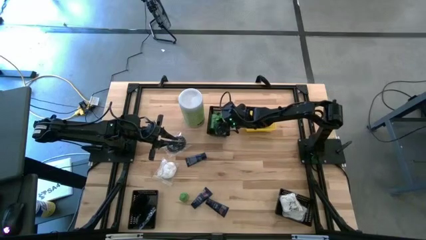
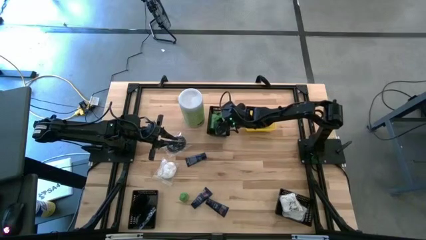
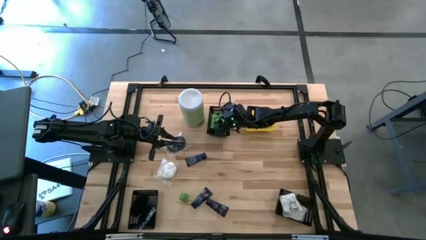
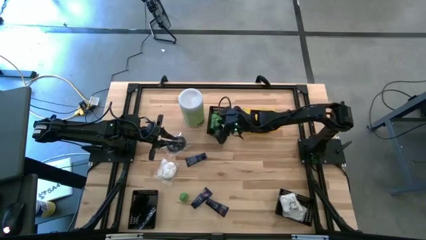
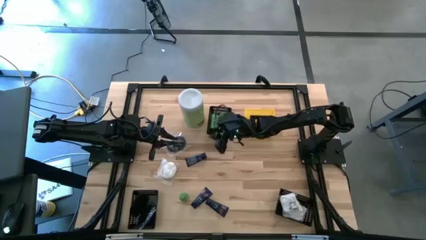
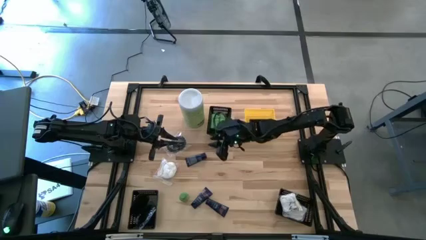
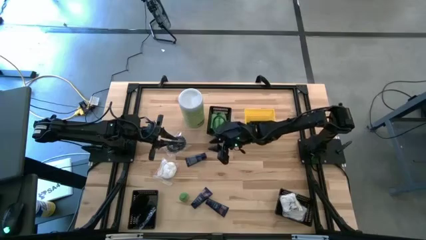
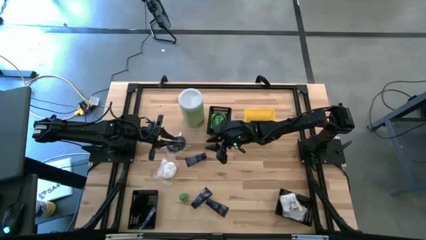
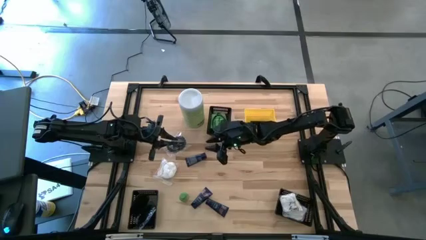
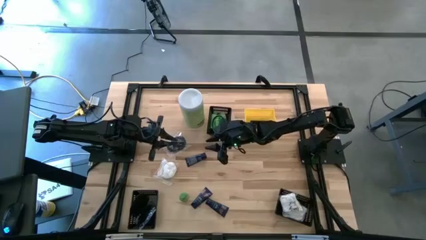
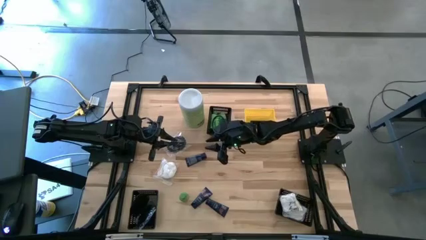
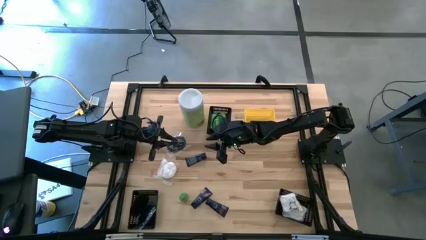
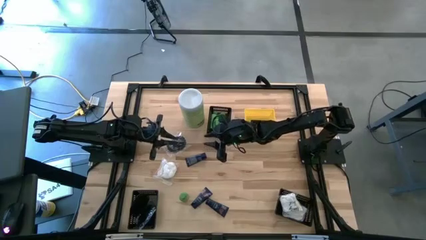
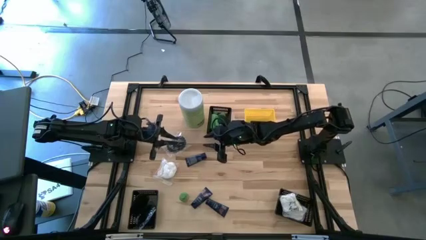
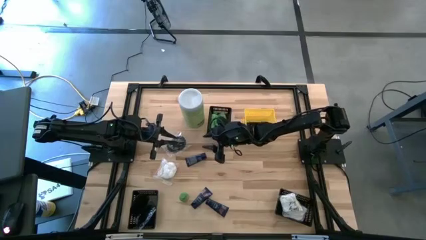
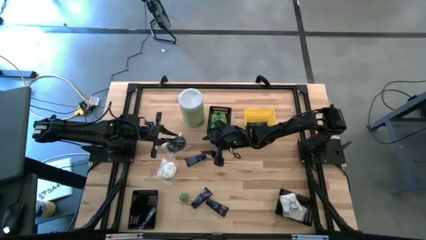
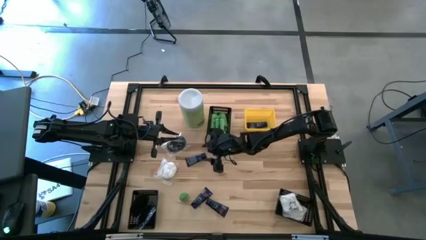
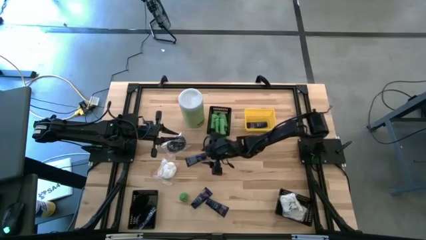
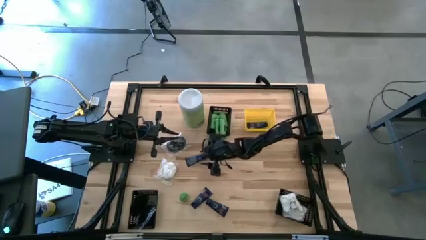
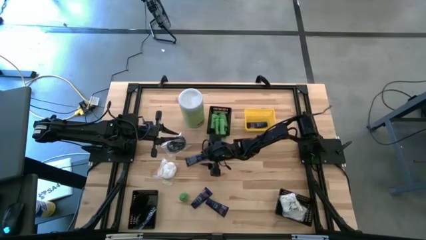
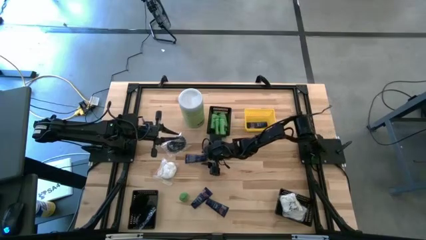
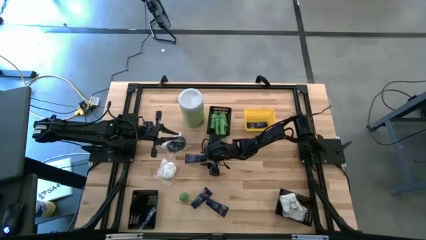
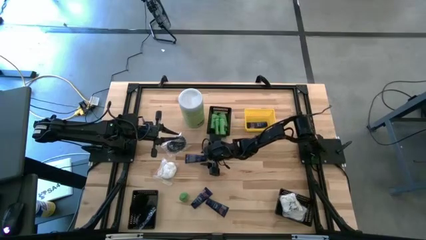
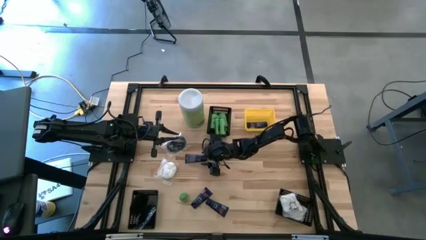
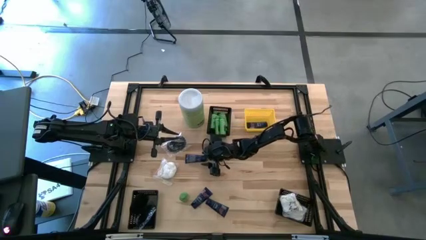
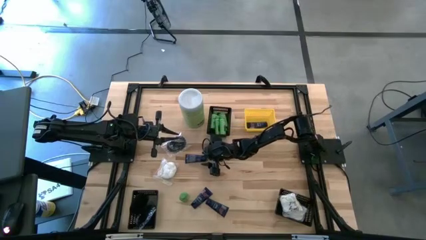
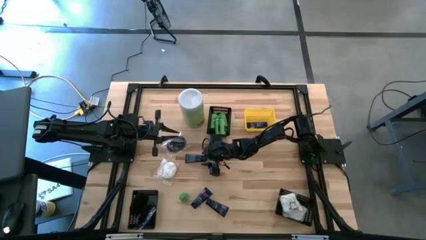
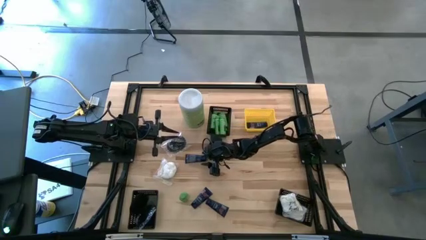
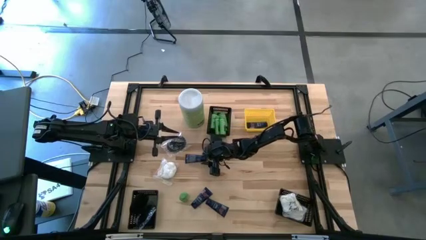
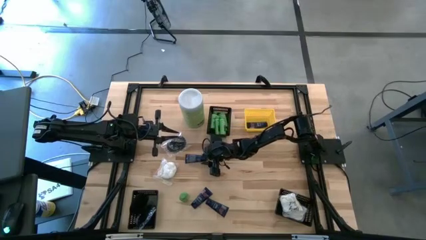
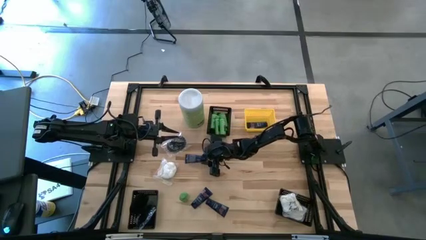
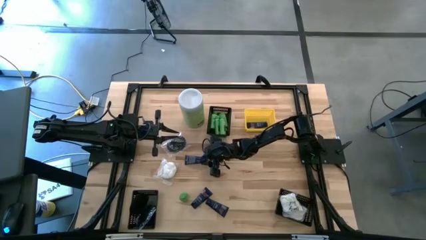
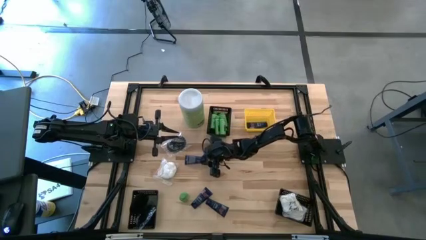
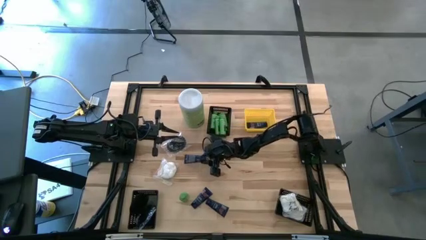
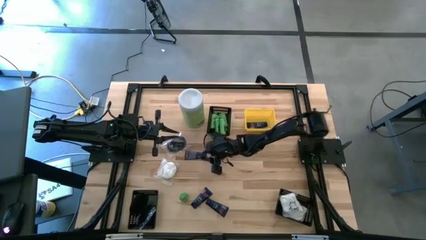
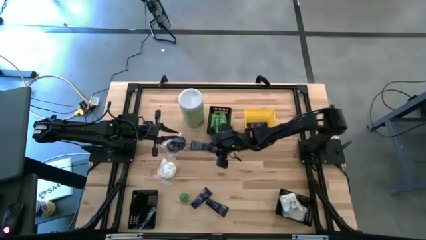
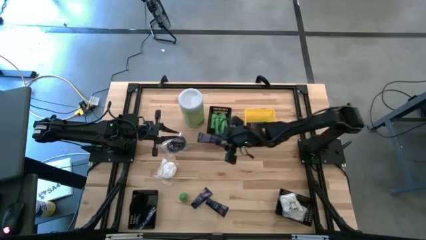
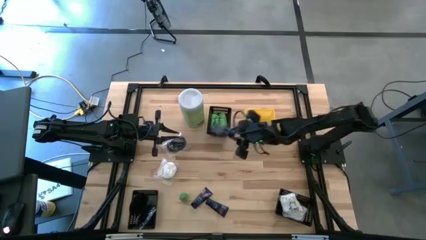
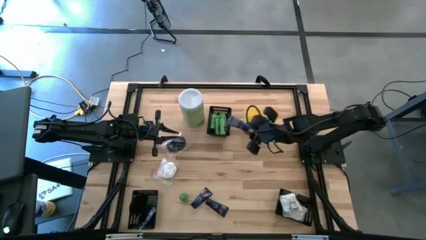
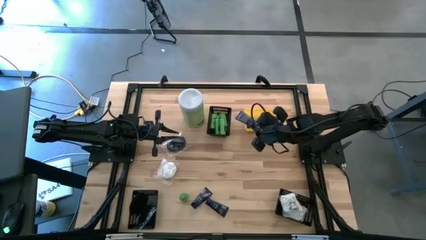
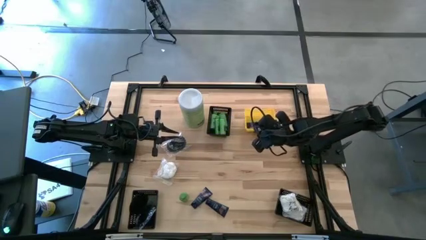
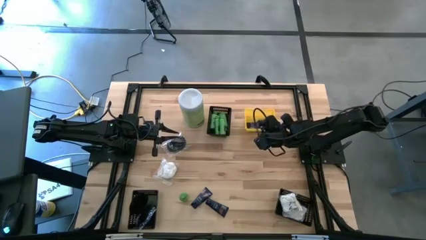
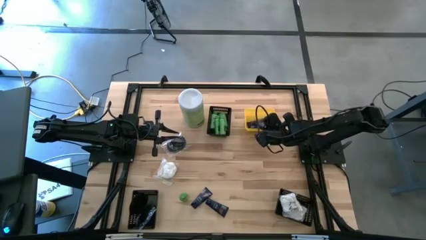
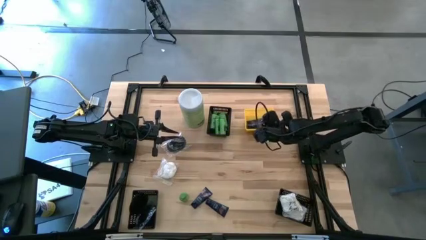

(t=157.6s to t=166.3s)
Task: Pick & Place Travel size toiletries
Put the blue shave butter into the yellow bin

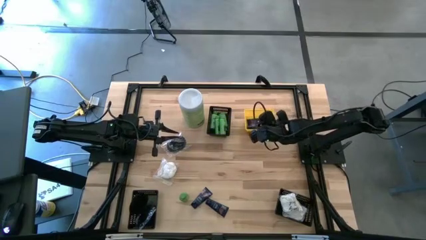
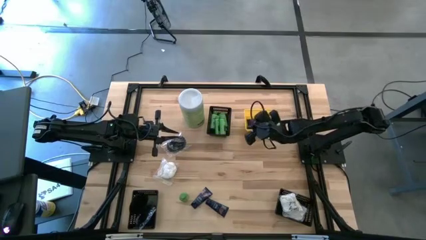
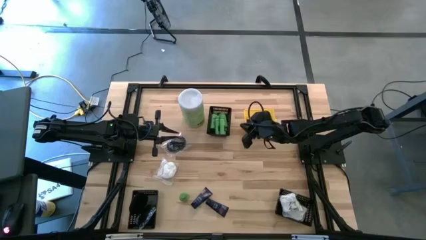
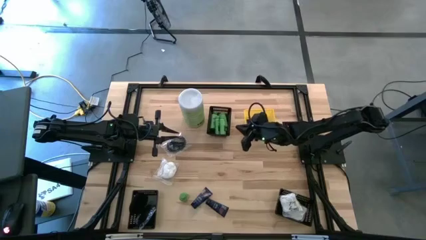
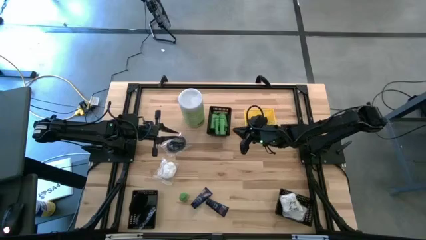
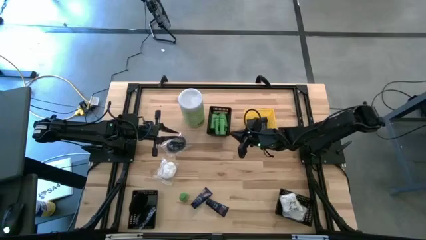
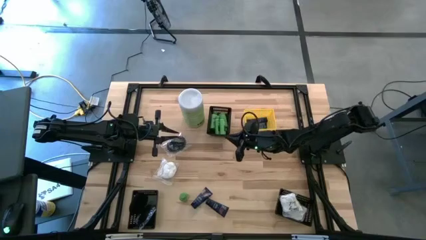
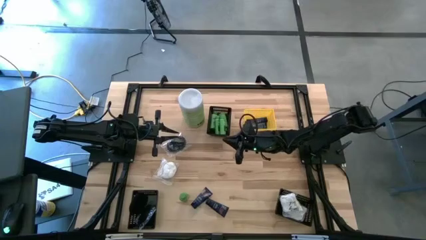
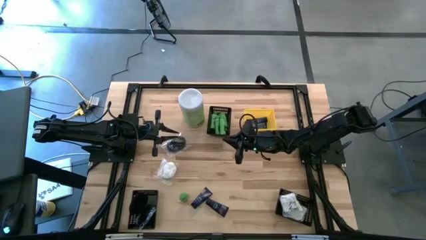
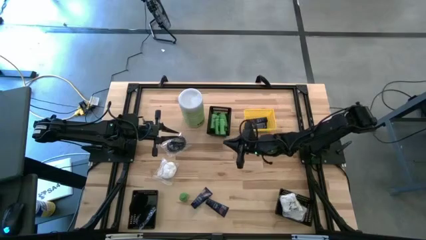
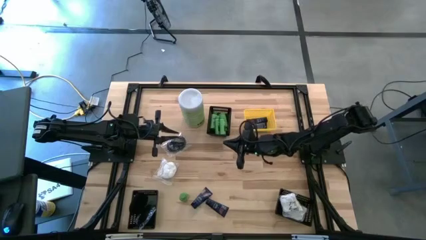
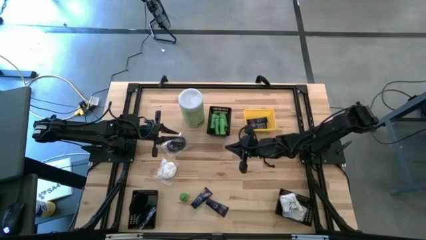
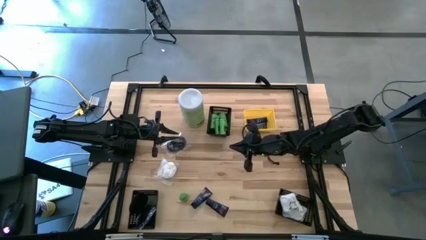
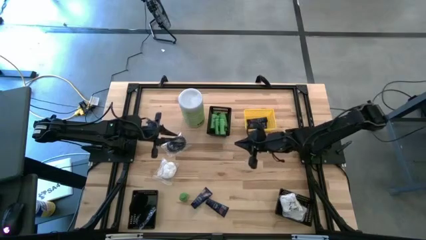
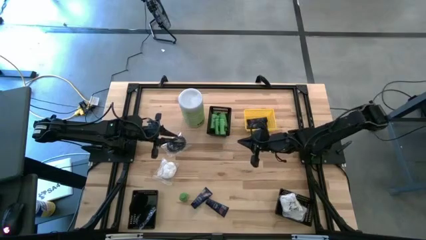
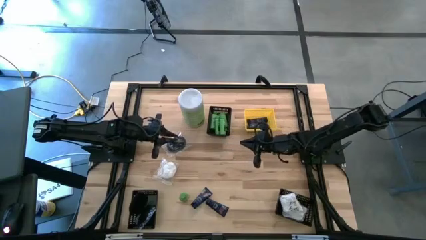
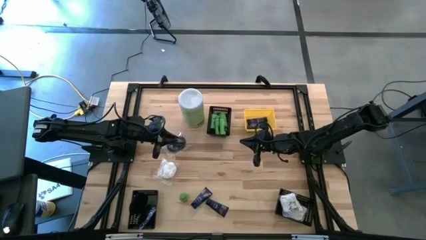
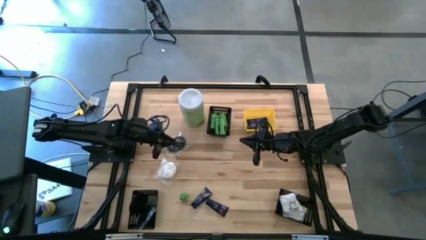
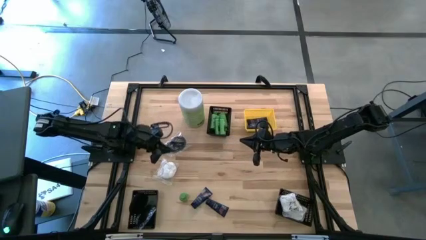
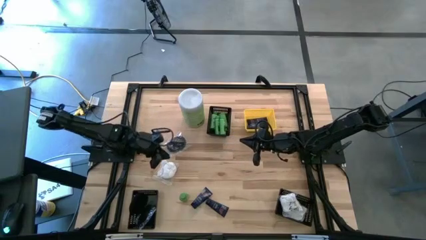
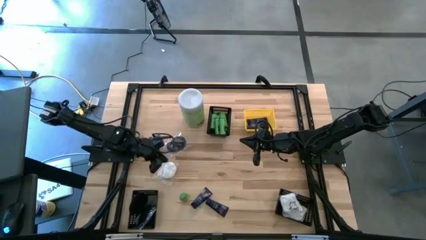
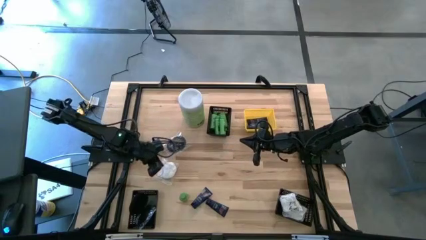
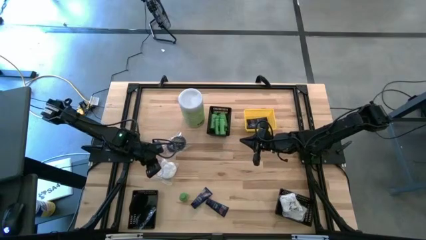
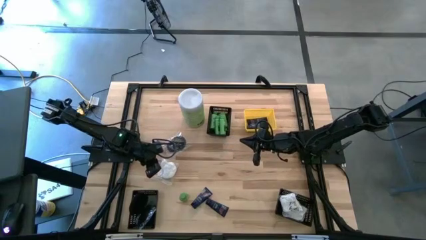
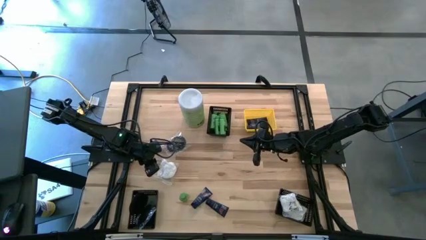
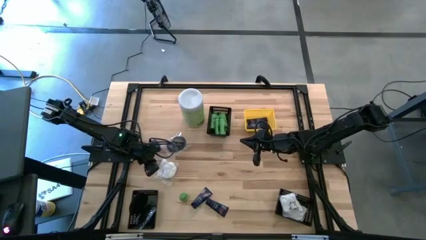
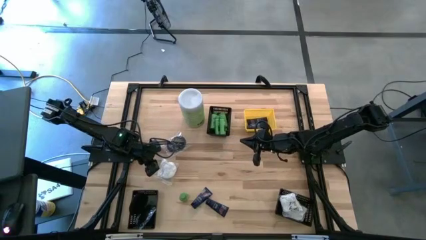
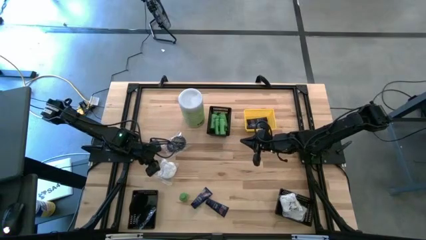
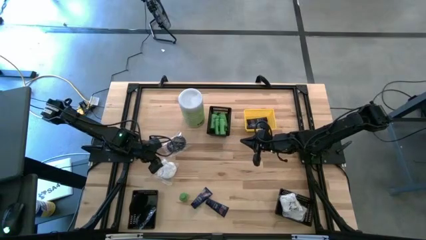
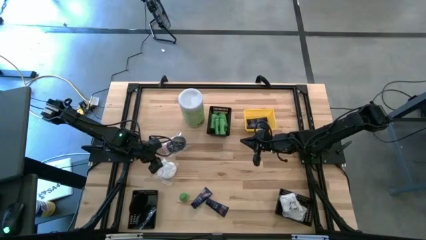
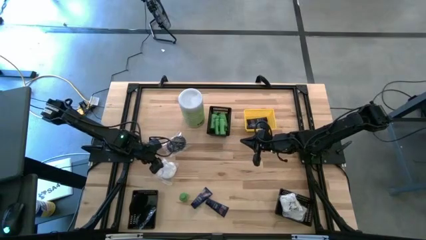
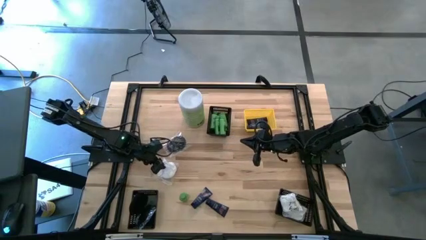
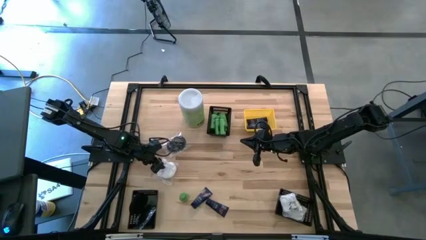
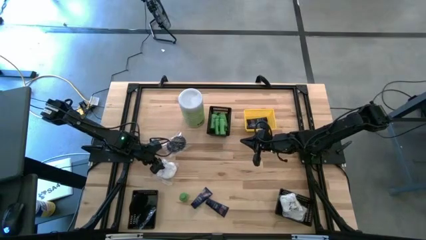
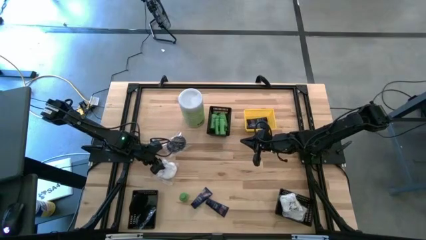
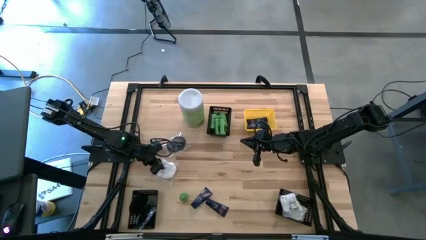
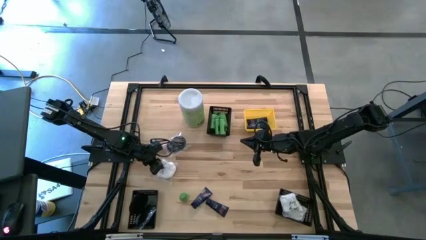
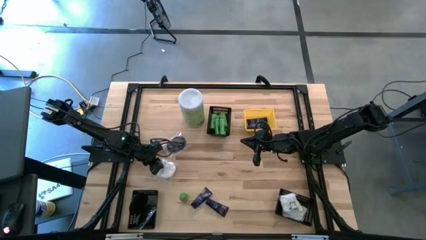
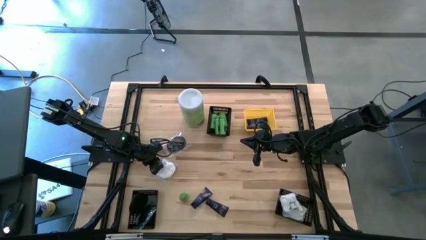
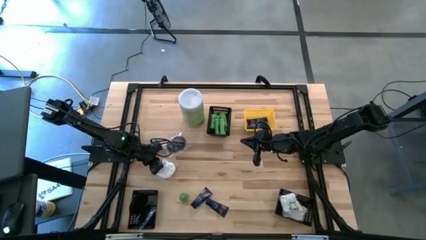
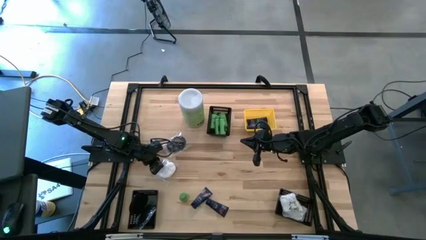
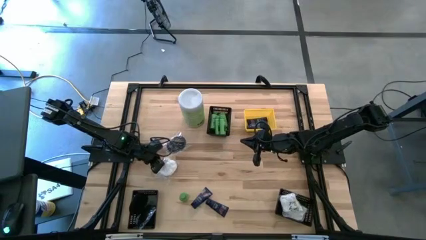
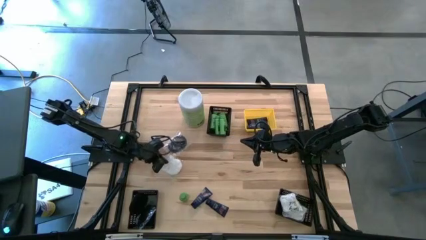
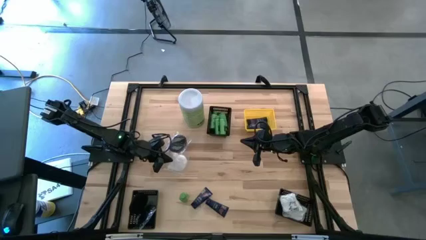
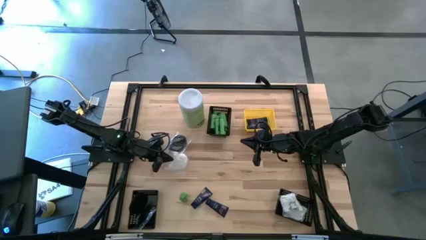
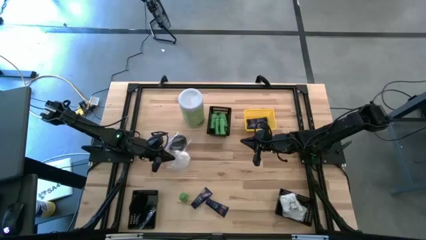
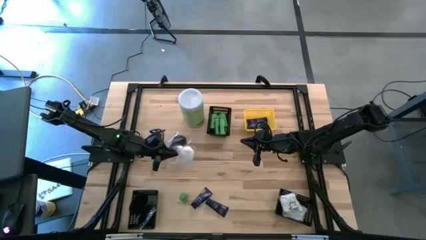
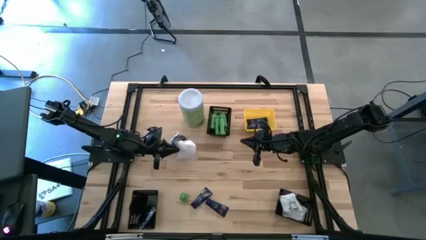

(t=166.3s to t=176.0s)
Put the white cotton pack into the bottom right black bin
